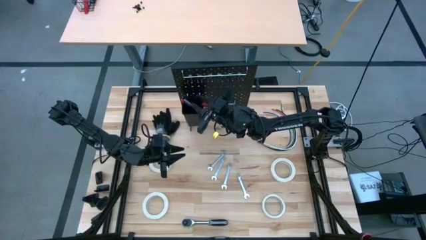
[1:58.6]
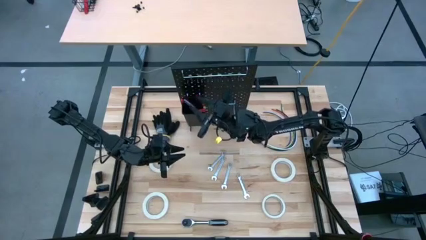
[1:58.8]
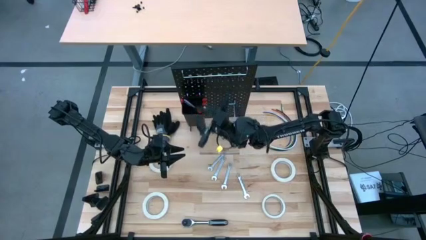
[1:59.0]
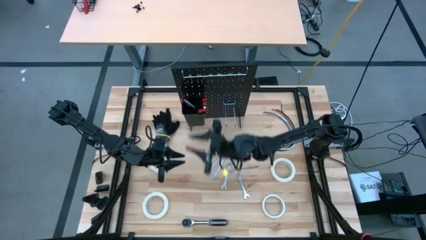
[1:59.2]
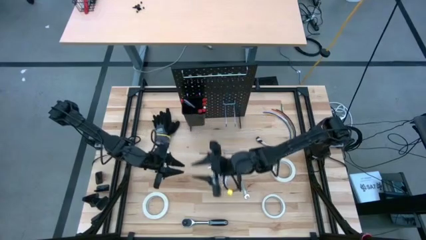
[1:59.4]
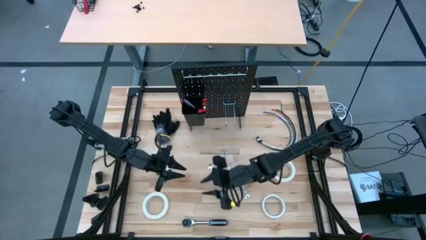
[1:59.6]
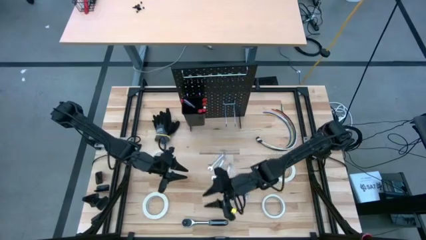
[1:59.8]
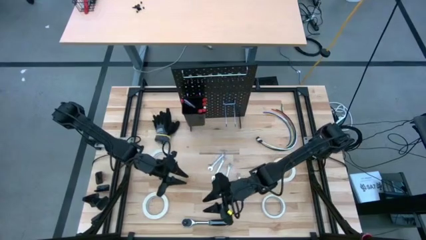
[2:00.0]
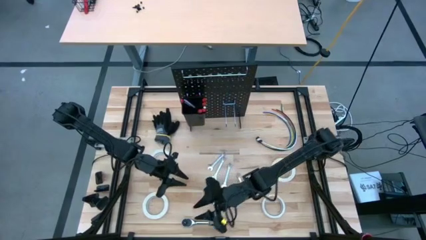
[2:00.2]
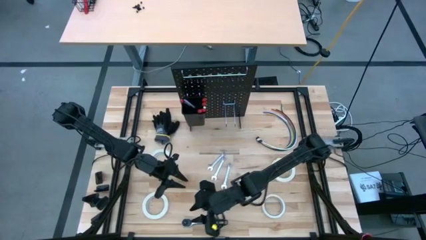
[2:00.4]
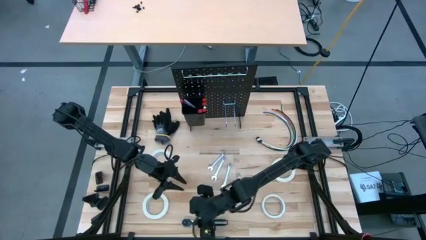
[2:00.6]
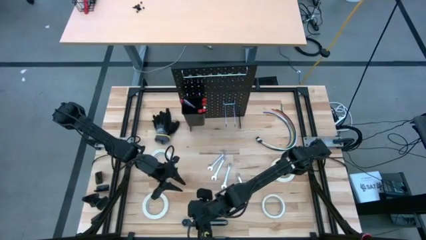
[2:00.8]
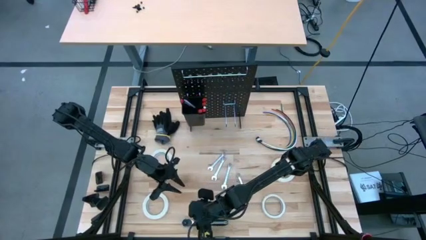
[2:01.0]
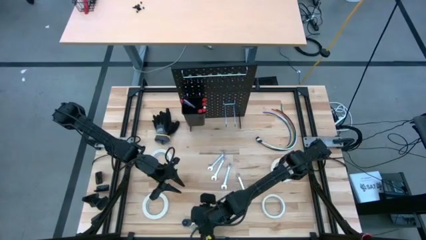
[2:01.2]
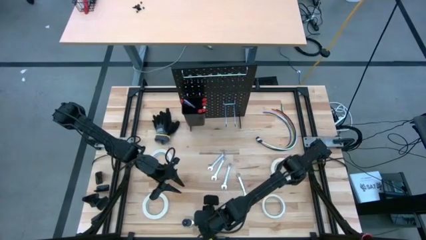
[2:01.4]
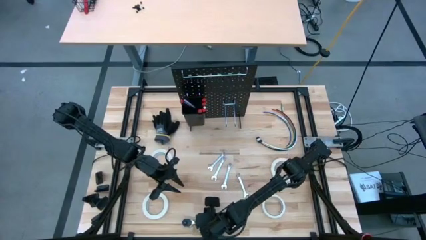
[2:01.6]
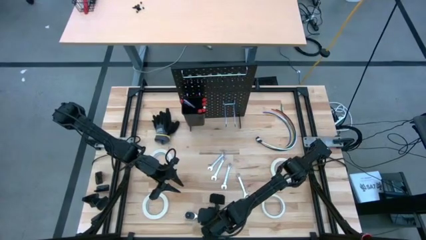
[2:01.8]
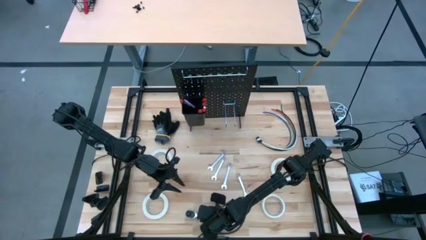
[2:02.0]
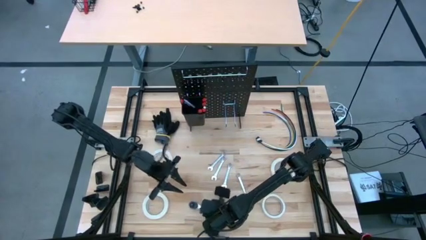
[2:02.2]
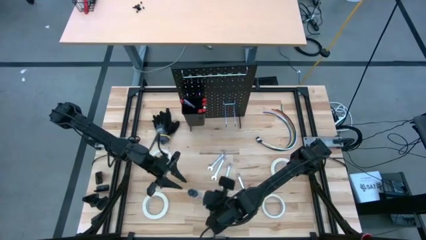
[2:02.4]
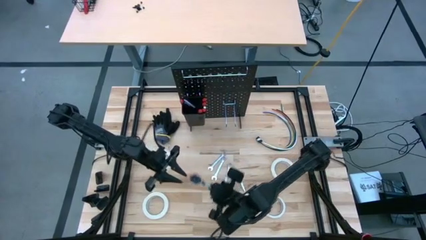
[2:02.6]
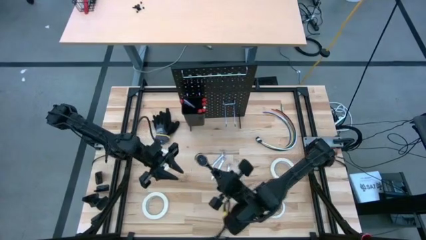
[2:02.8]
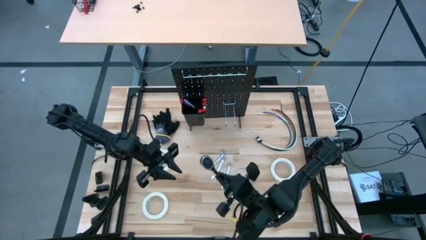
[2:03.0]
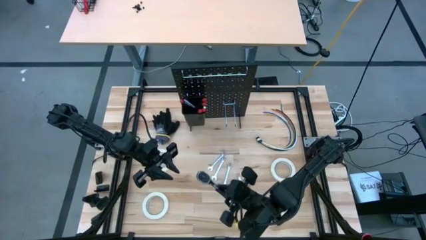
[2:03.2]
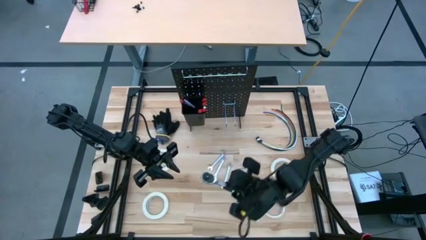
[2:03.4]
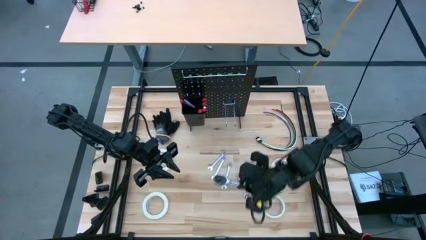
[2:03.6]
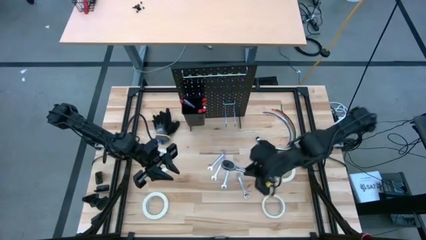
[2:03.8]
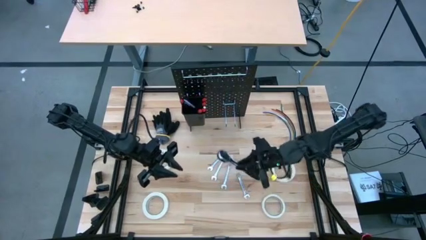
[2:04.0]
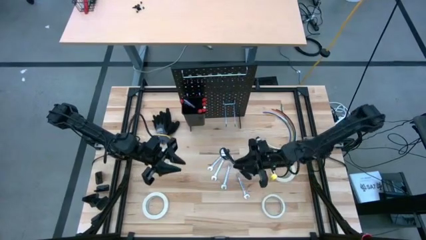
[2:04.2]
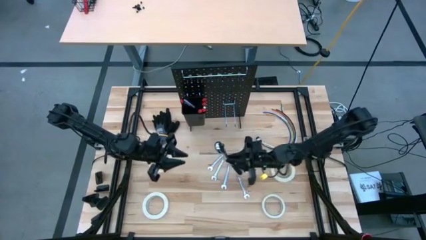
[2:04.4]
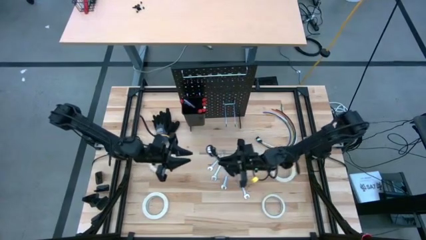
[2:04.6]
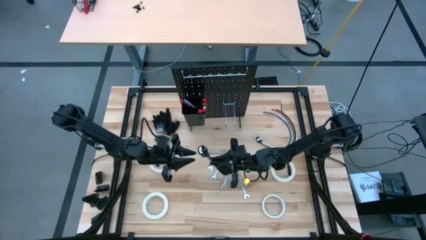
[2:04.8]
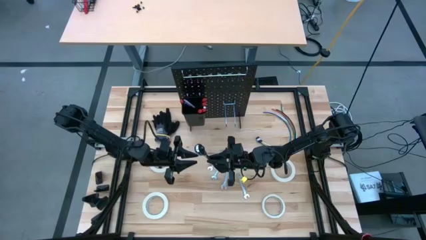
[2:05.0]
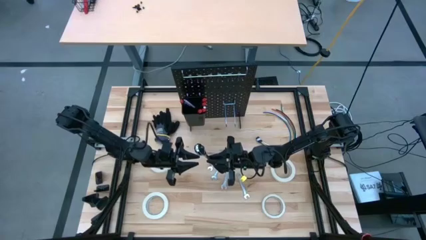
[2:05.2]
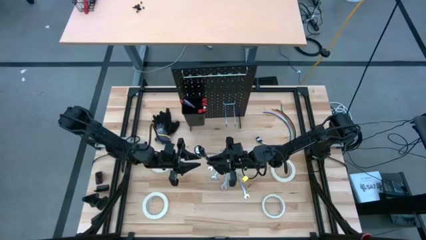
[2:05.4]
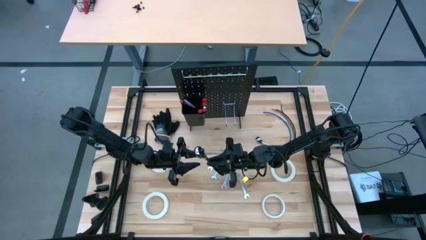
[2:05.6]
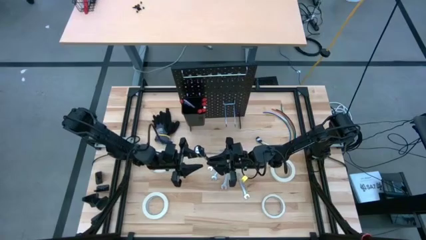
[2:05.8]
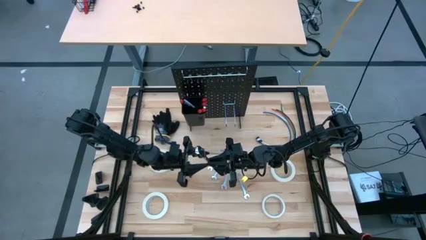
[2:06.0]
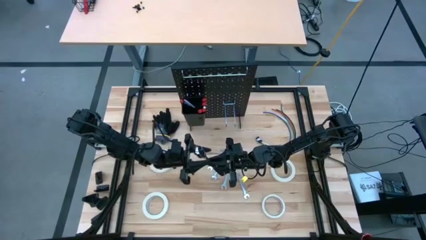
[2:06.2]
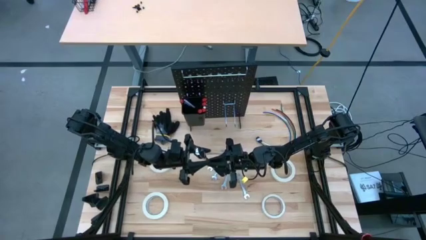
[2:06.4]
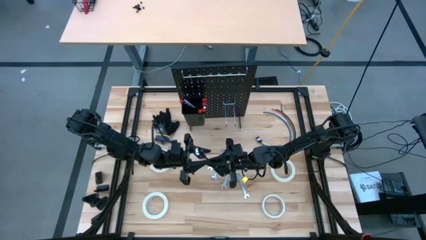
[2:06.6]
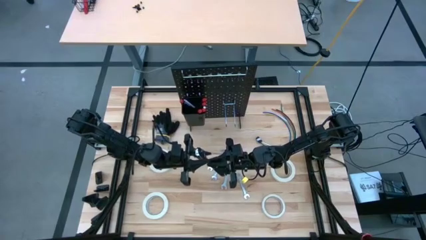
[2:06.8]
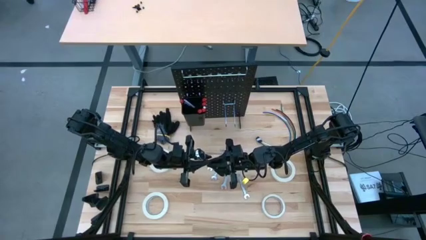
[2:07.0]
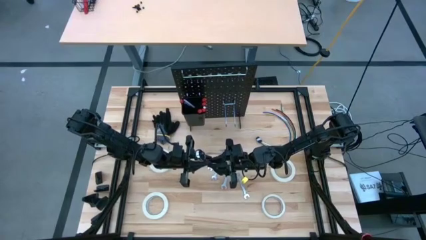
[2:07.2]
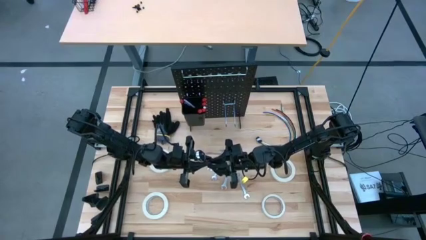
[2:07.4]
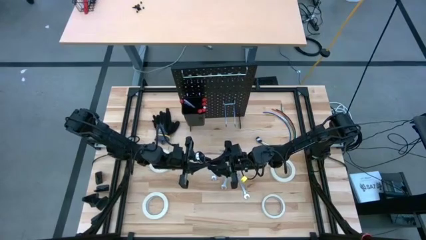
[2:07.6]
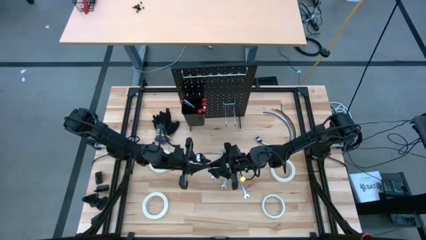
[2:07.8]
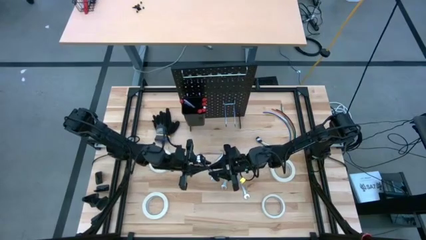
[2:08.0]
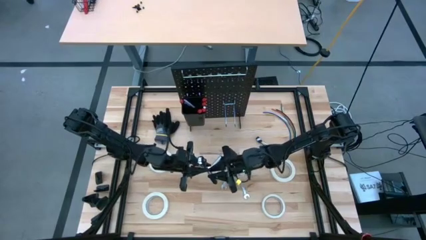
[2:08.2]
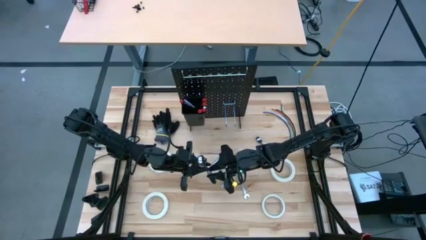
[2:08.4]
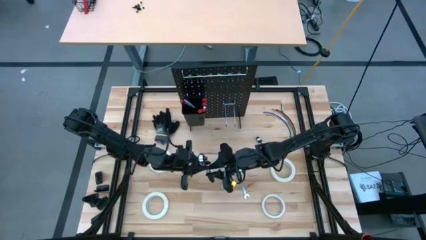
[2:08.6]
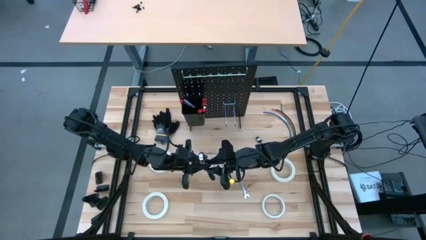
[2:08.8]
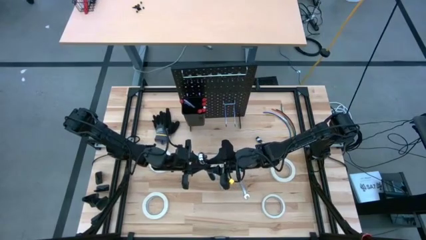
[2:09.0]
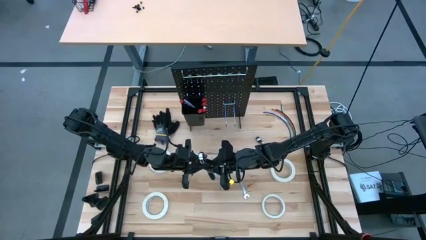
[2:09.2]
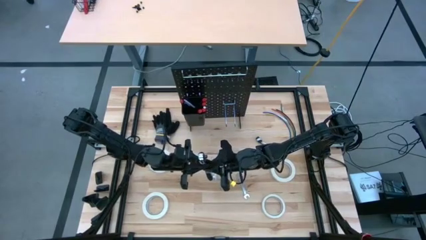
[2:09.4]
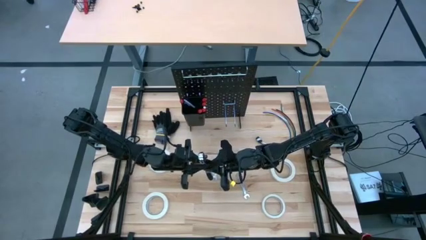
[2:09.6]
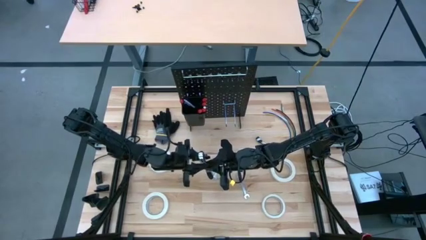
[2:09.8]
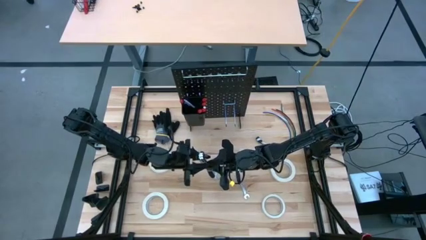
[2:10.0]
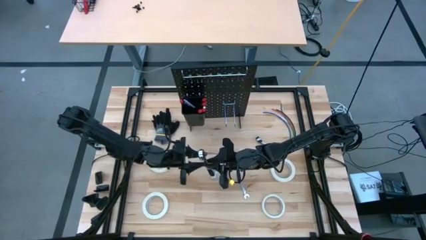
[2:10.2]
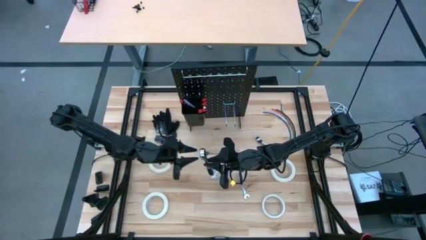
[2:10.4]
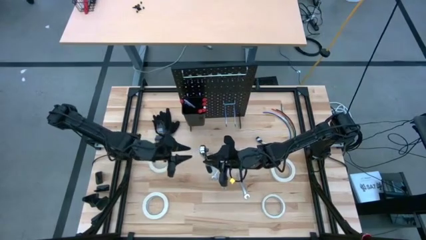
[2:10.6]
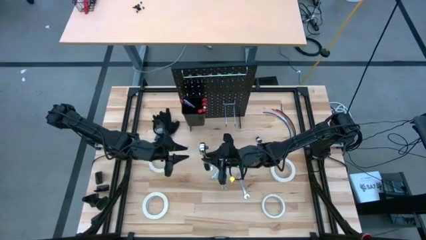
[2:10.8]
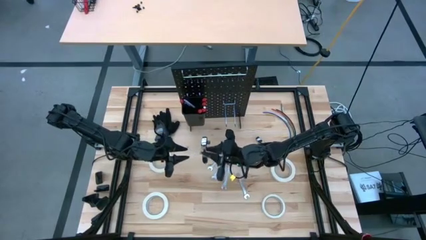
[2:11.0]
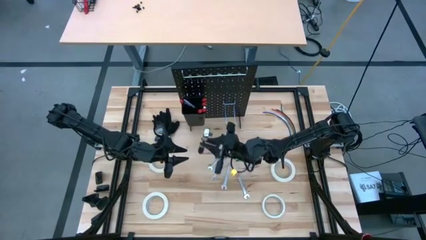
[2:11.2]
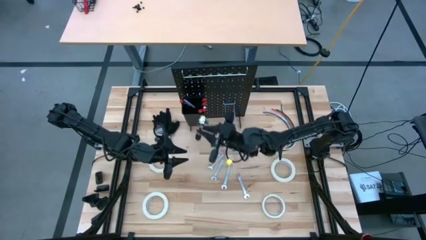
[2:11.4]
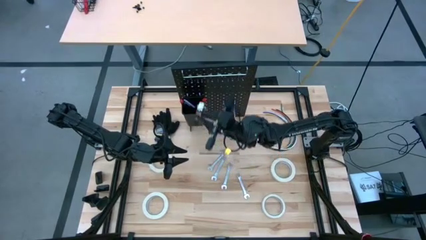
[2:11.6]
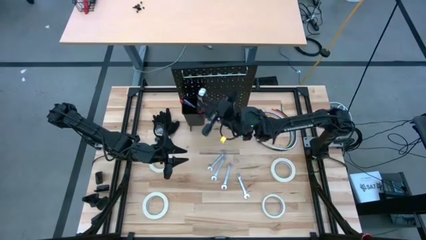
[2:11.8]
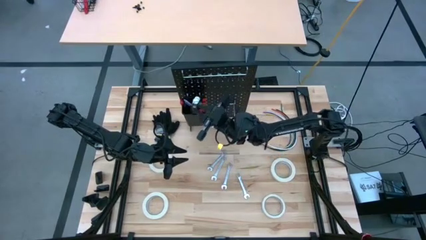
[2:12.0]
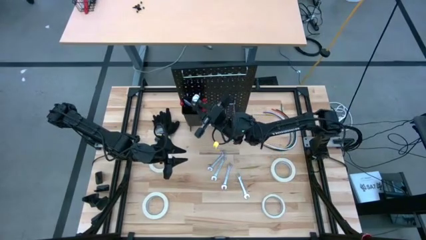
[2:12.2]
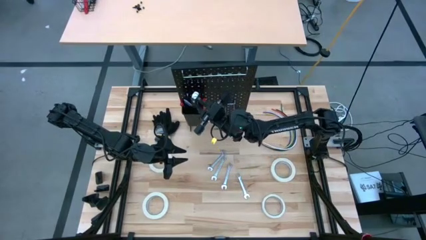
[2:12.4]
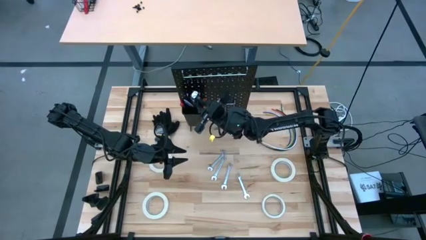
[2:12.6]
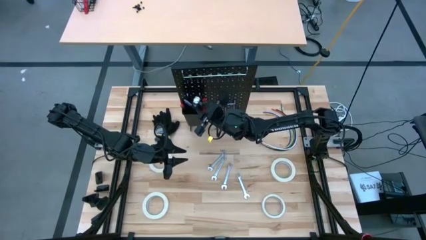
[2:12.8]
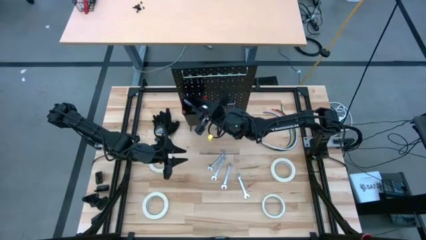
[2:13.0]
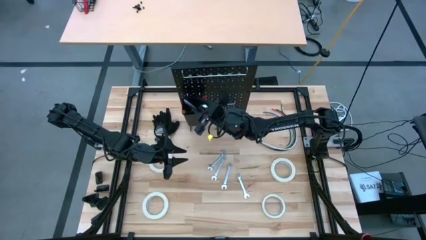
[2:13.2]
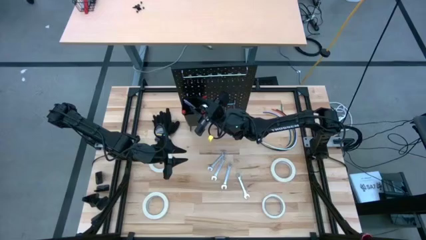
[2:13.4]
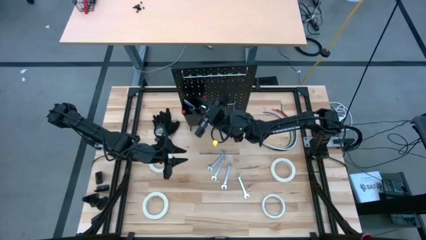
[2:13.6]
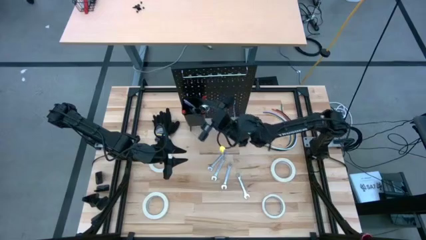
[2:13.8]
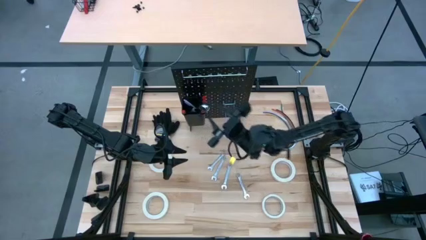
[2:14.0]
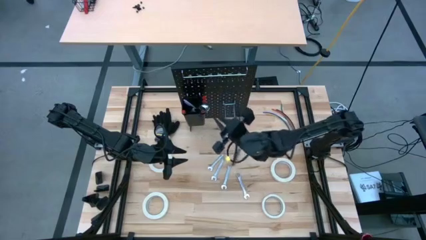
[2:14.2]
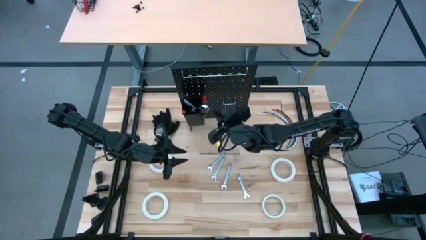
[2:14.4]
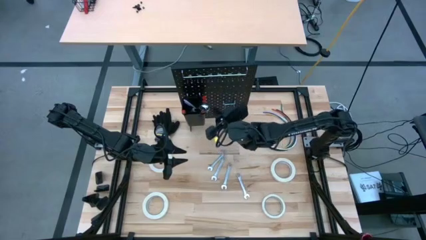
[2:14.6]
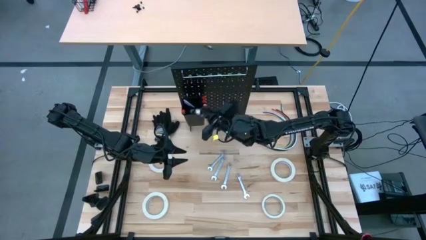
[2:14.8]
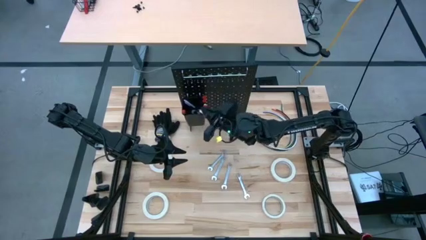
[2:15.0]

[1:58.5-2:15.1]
Task: Hang tools onto peg board
Put the ratchet wrench into the black bin on the peg board
